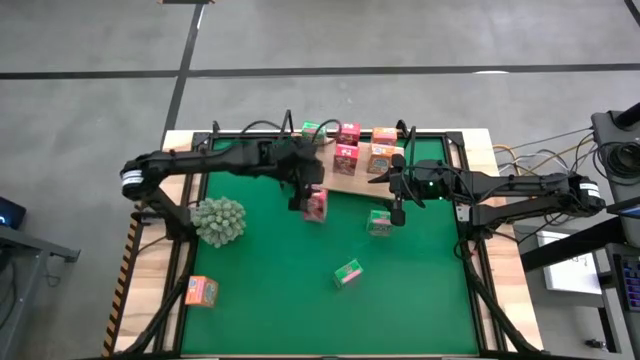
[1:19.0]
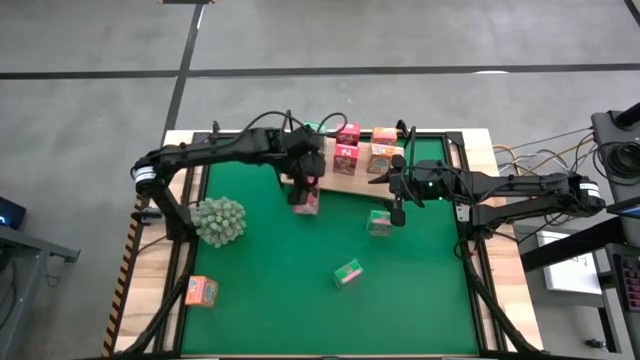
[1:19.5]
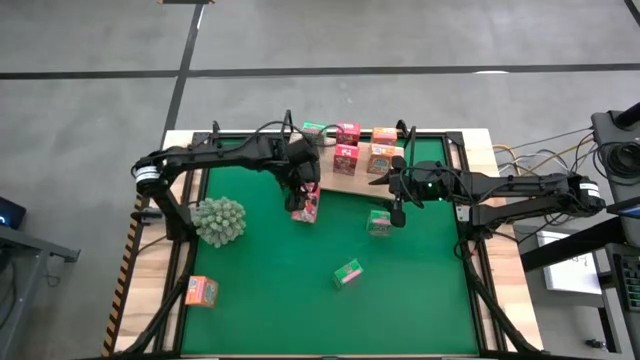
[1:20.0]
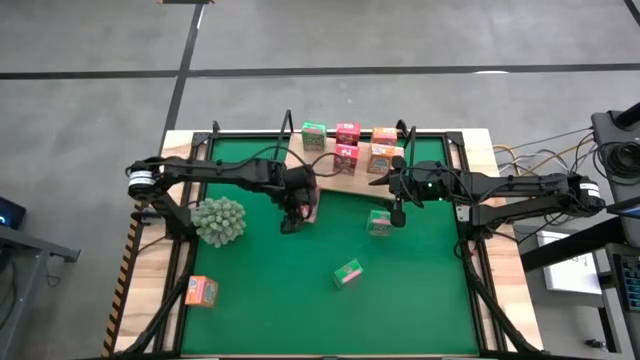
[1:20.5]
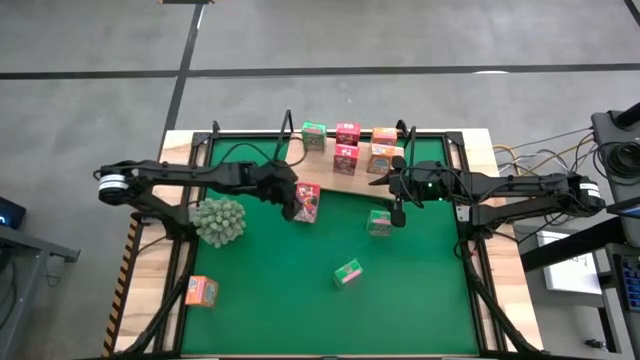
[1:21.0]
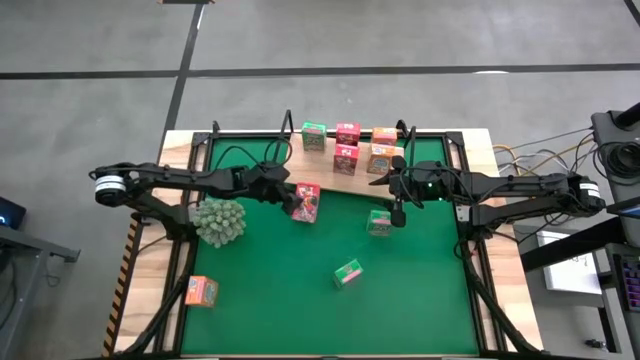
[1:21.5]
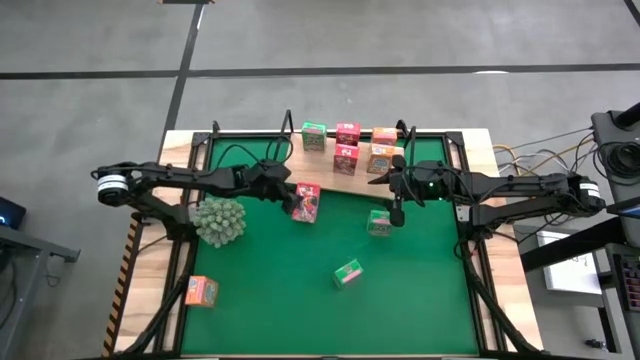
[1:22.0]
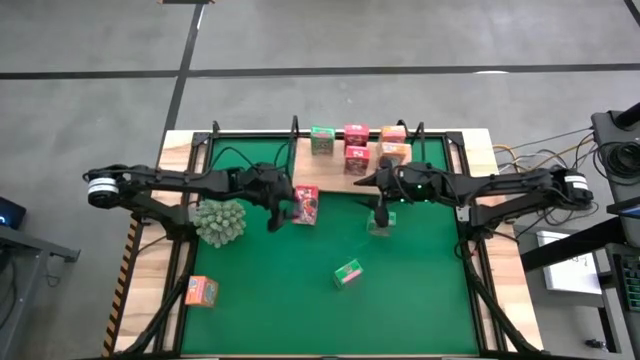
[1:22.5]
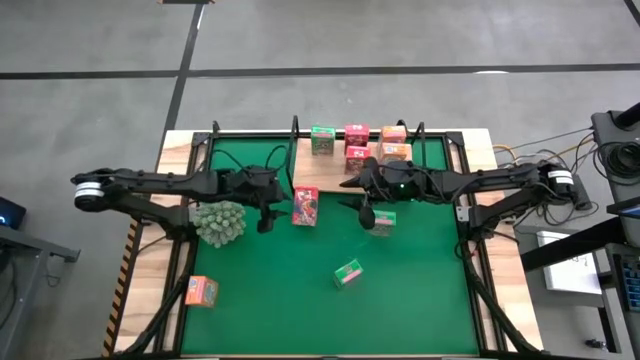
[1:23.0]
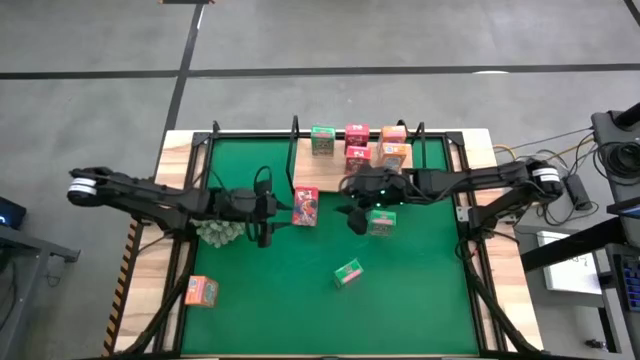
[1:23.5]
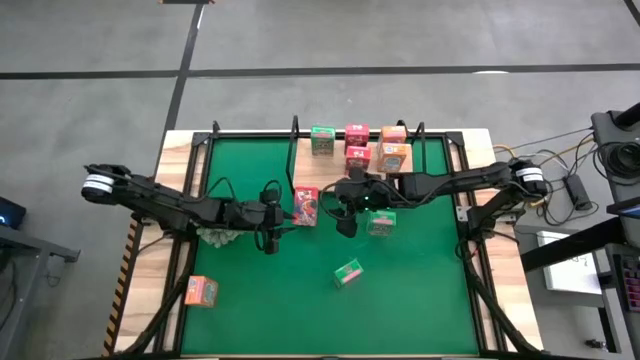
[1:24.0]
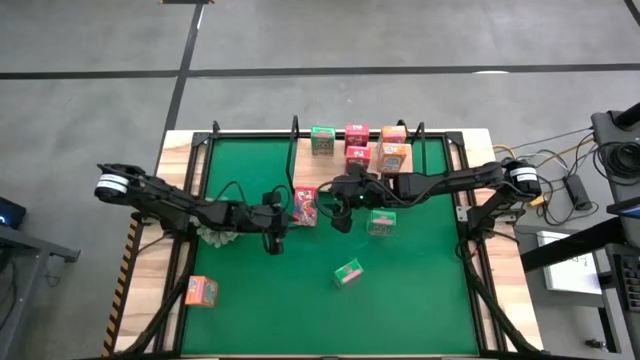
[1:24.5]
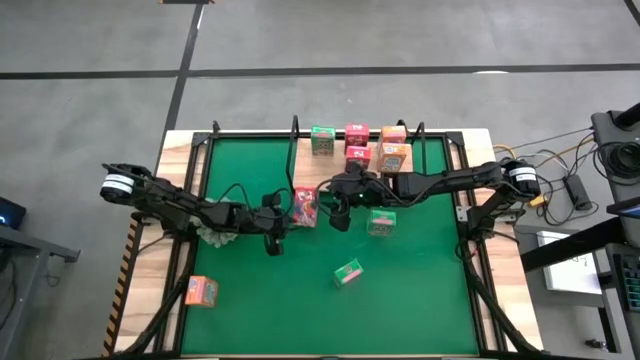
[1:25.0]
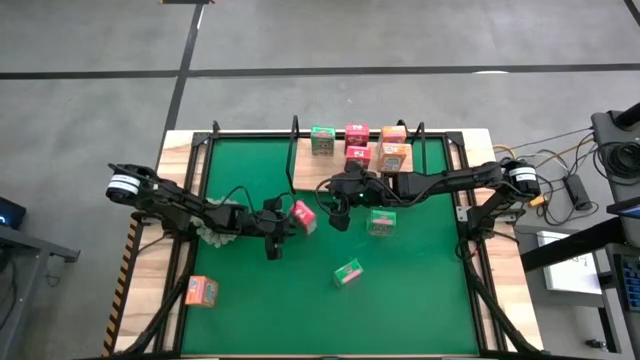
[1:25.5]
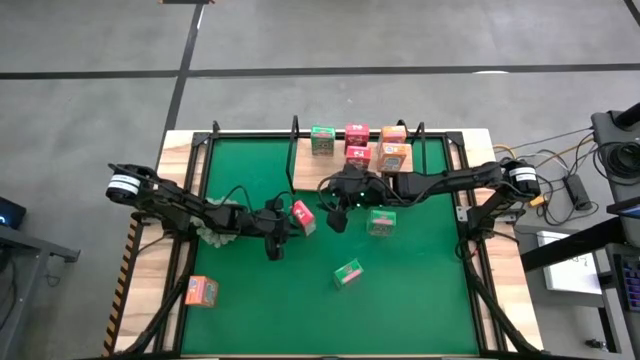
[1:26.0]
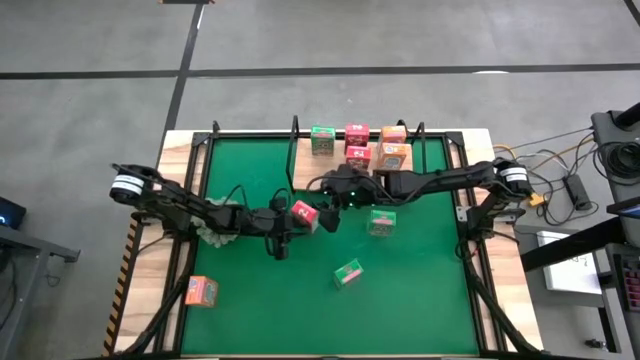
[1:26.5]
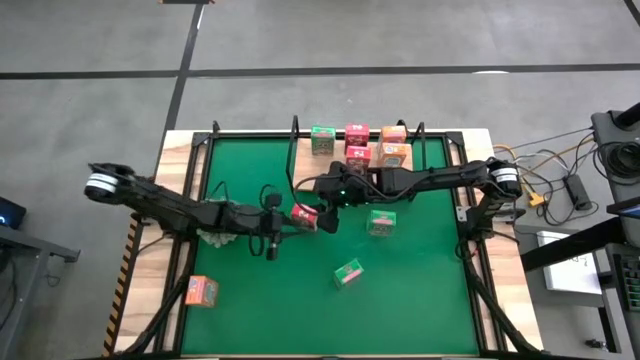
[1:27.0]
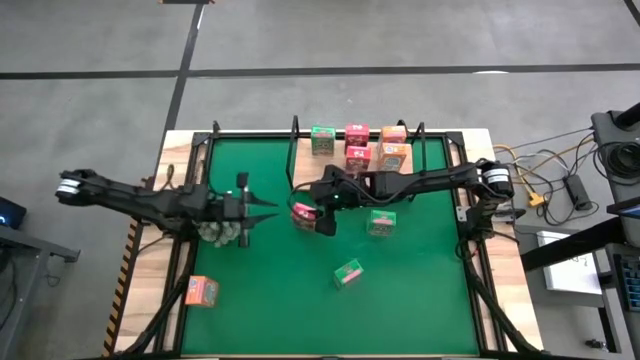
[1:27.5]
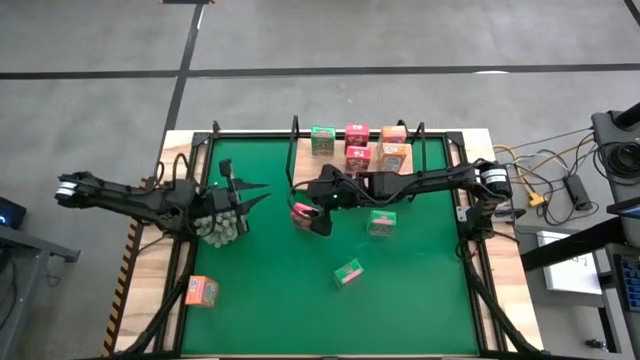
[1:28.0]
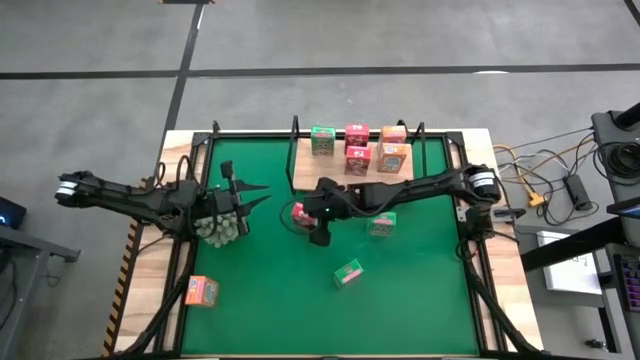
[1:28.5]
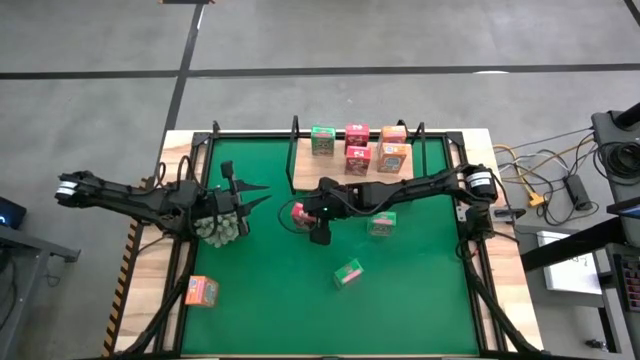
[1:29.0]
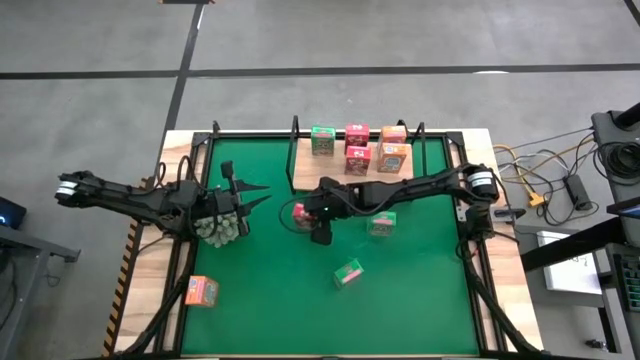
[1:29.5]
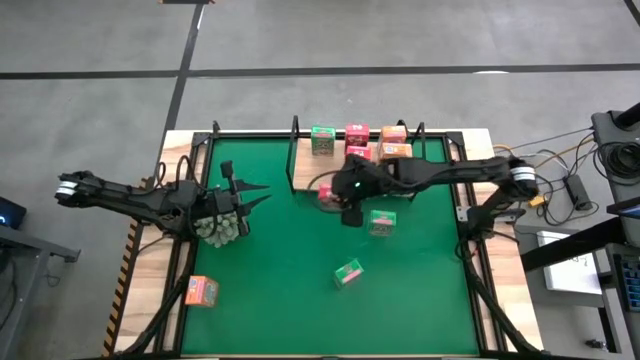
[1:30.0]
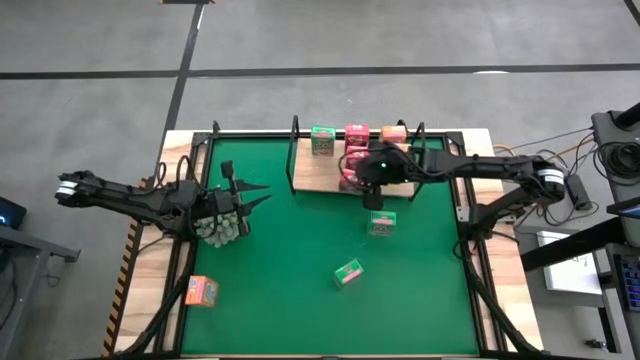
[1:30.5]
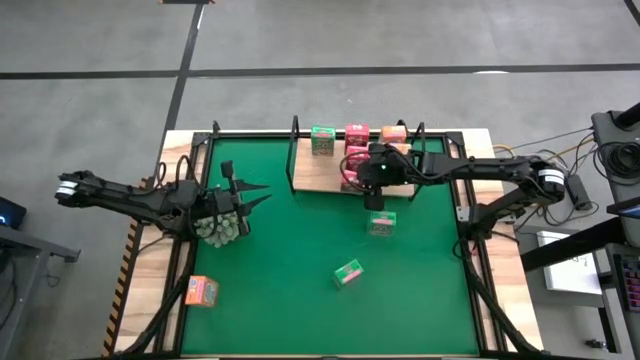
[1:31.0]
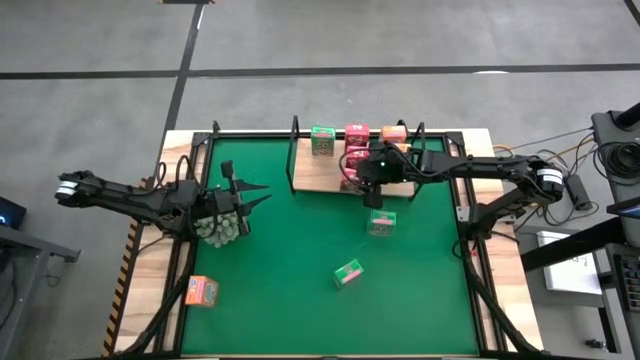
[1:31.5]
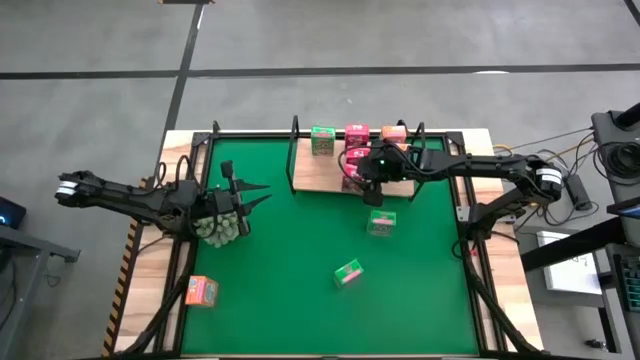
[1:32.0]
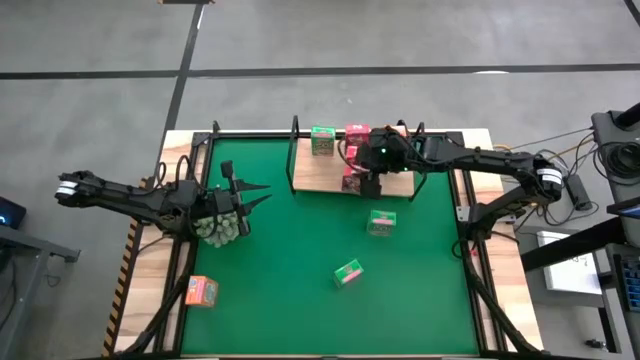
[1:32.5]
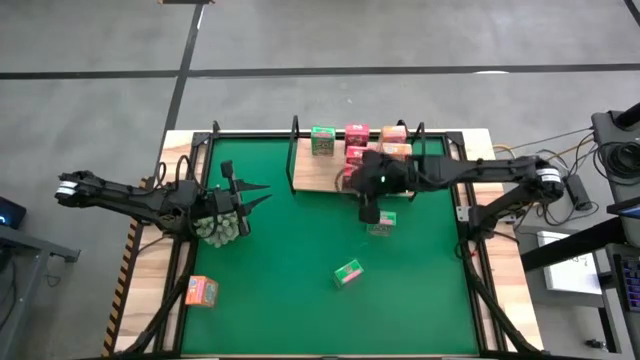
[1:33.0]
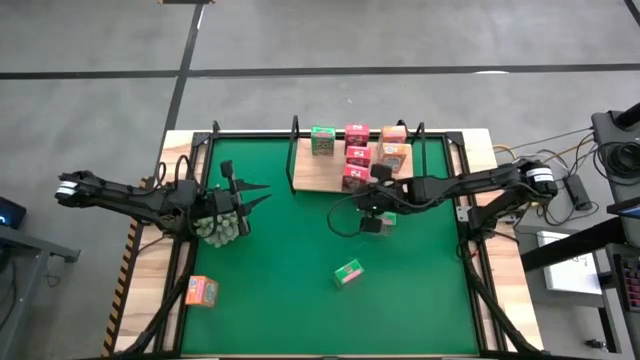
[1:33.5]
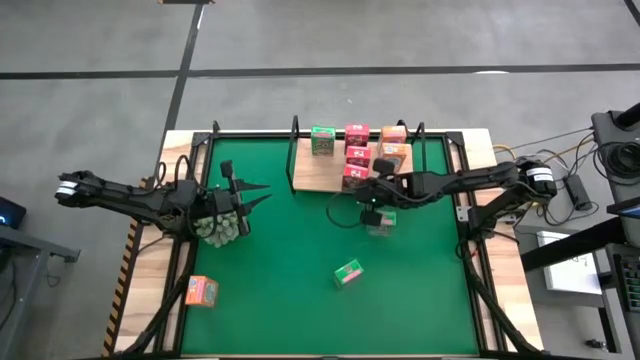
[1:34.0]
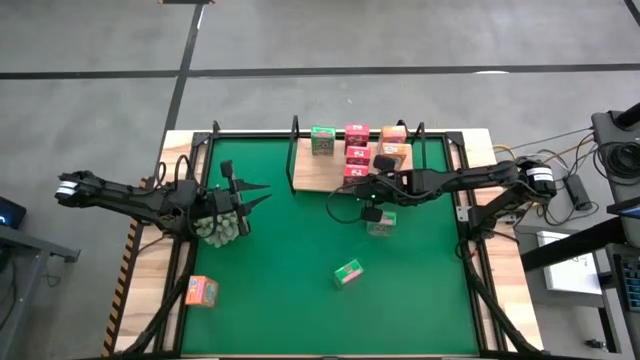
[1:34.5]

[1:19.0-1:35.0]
Task: Stack cereal on shelf
Put the red cereal box on the shelf aligned with the other red cereal boxes

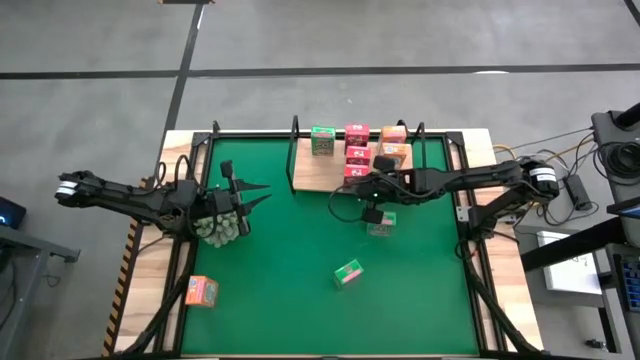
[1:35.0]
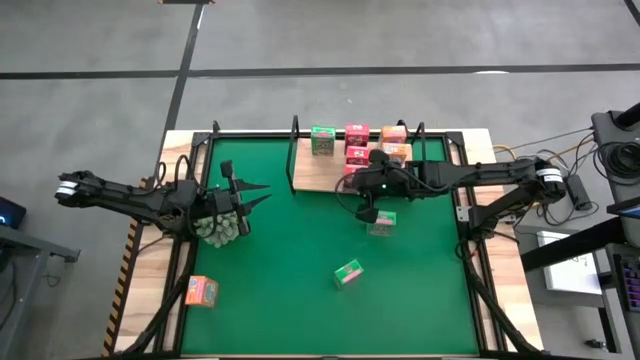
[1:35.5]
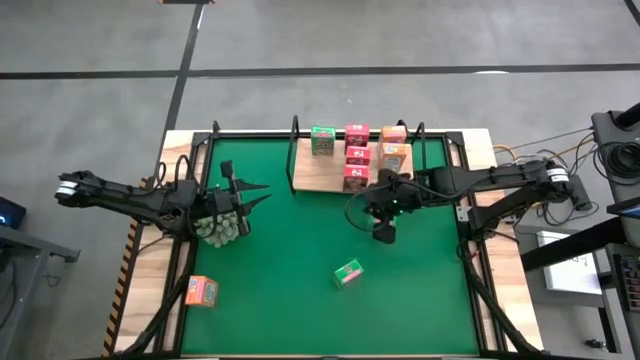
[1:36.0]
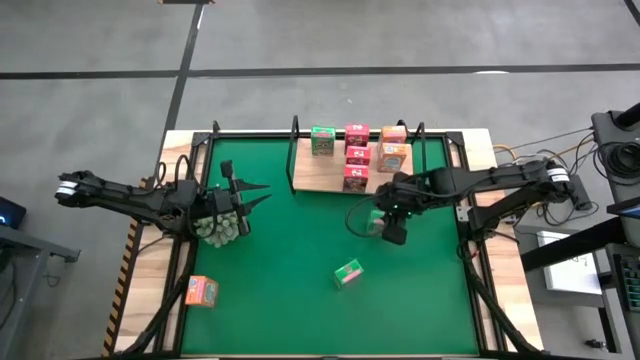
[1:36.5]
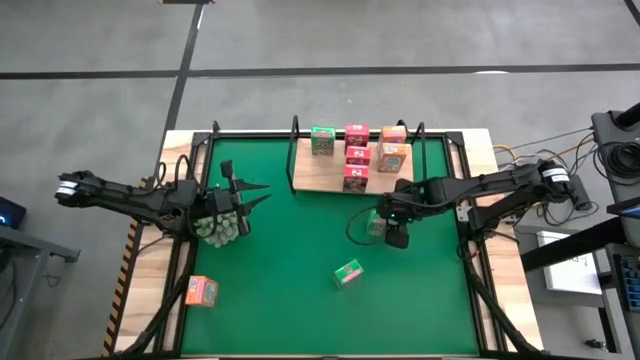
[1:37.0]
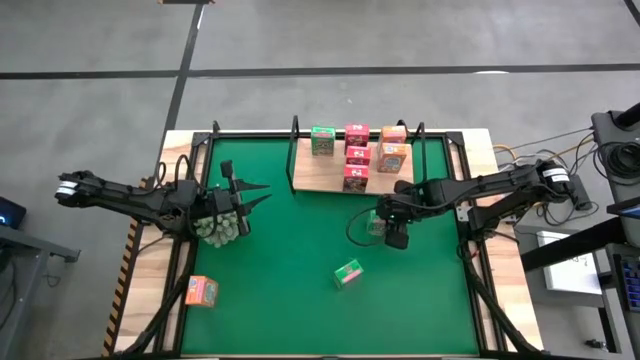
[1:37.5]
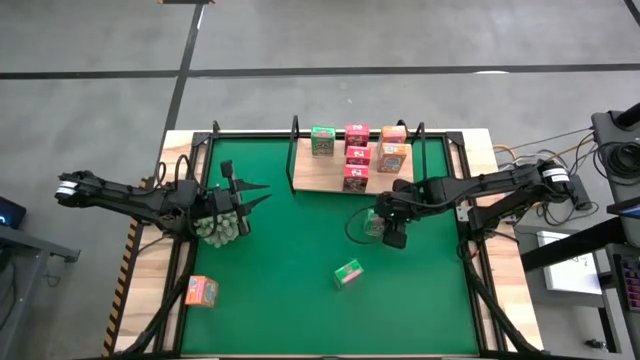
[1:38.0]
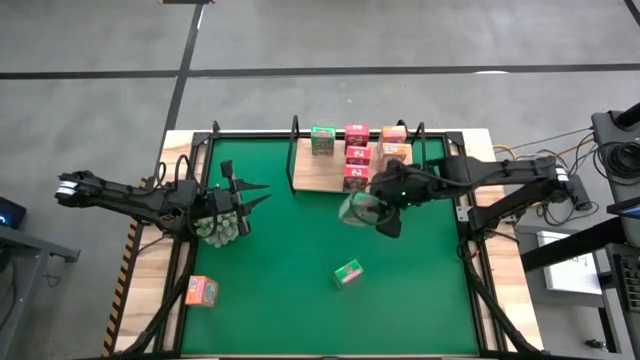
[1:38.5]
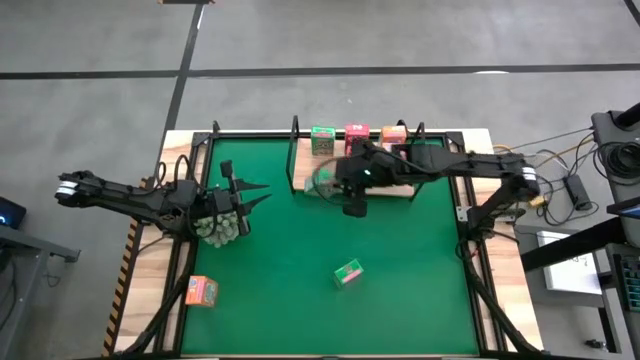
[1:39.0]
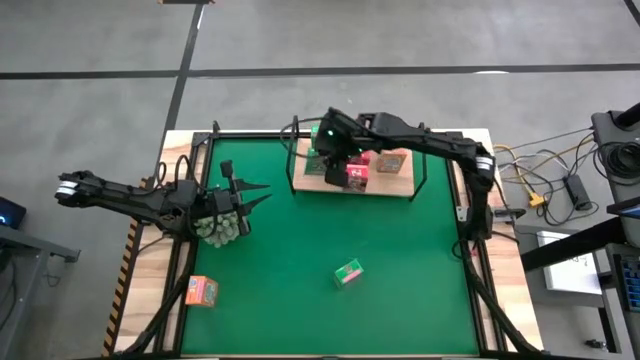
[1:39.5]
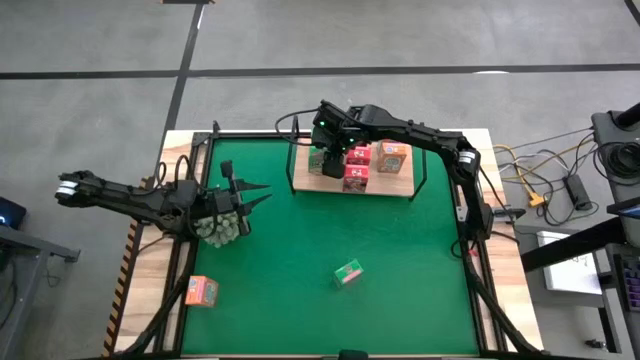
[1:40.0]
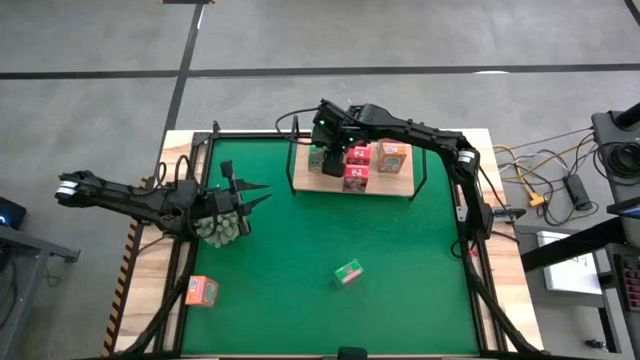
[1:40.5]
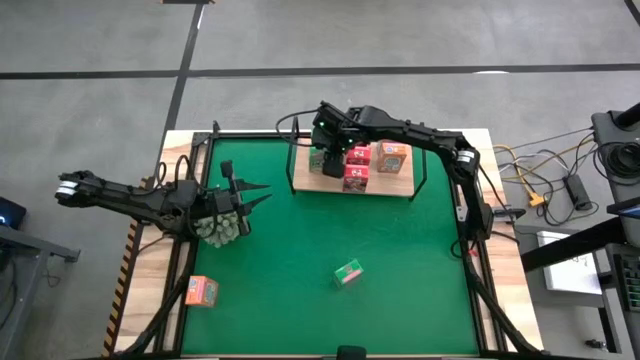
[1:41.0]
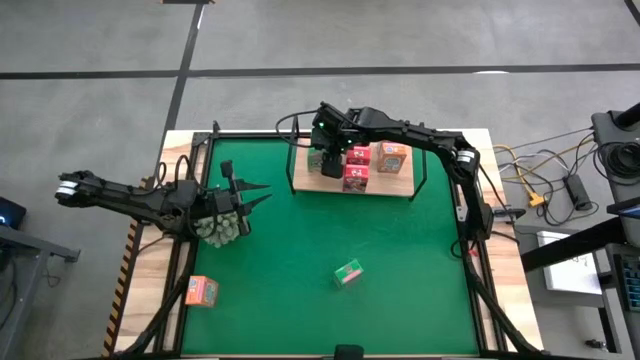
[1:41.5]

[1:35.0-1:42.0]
Put the top green cereal box on the shelf aligned with the other green cereal box
